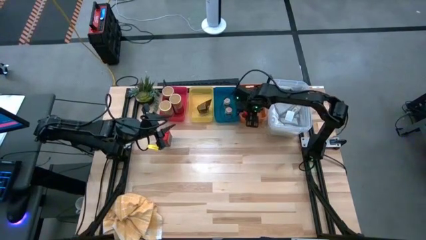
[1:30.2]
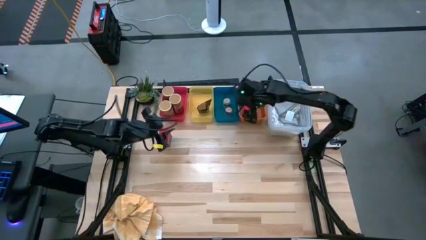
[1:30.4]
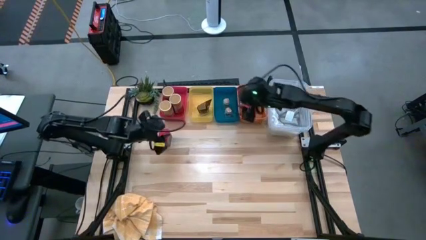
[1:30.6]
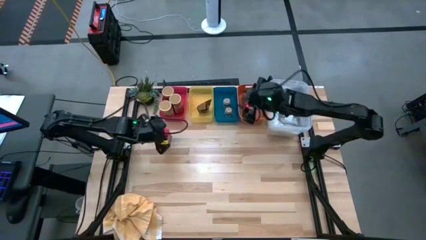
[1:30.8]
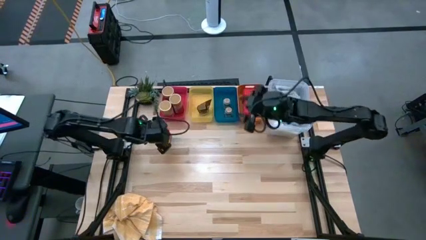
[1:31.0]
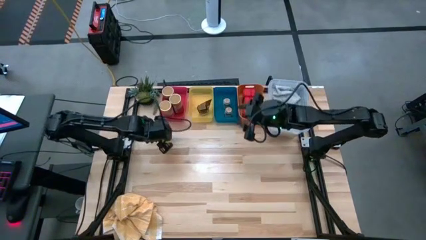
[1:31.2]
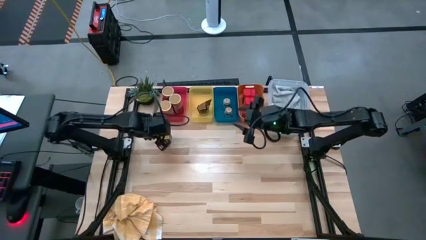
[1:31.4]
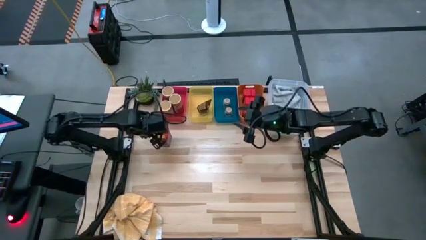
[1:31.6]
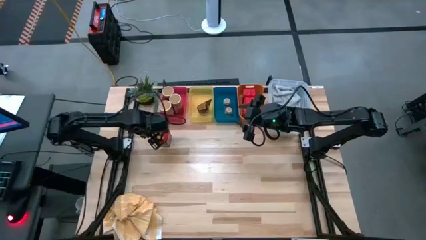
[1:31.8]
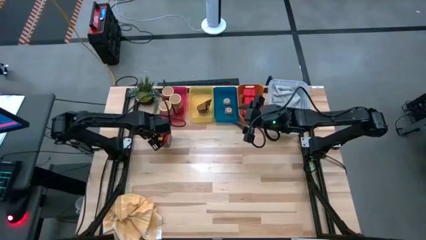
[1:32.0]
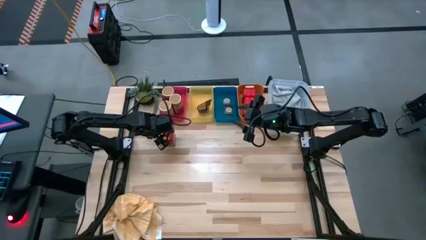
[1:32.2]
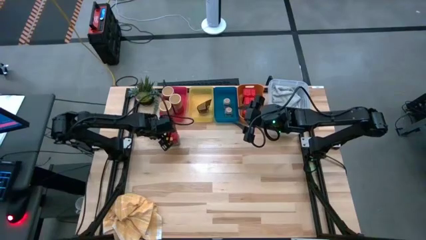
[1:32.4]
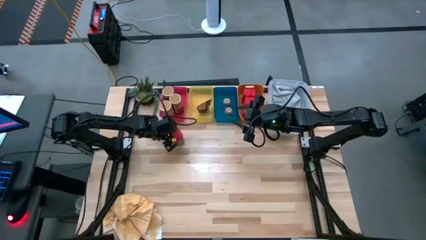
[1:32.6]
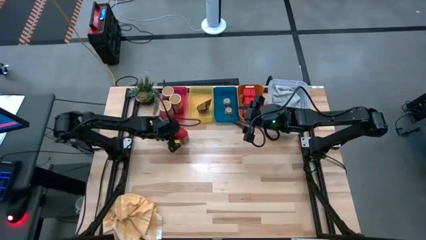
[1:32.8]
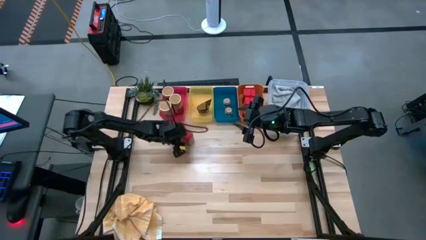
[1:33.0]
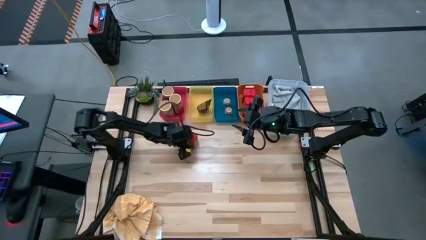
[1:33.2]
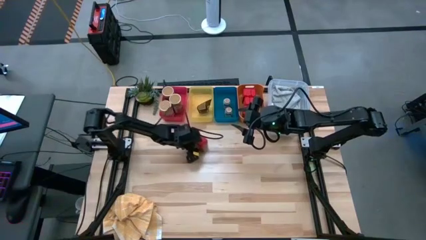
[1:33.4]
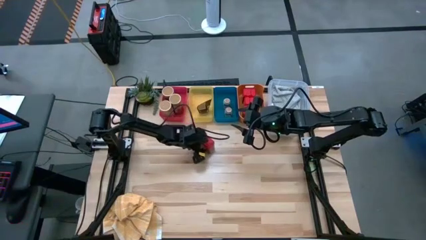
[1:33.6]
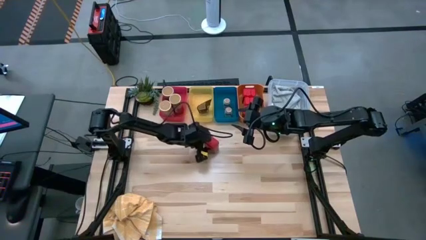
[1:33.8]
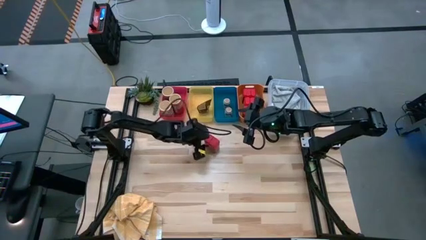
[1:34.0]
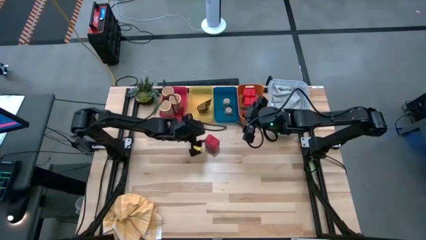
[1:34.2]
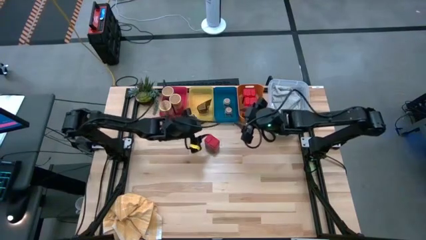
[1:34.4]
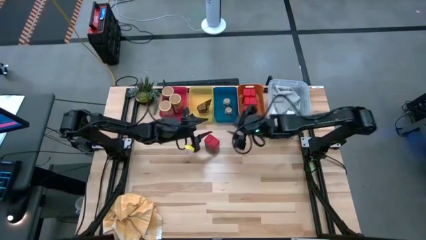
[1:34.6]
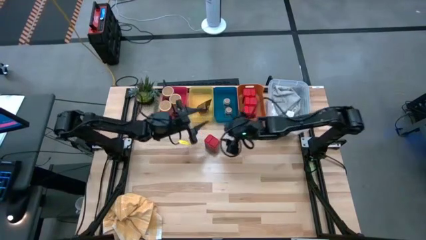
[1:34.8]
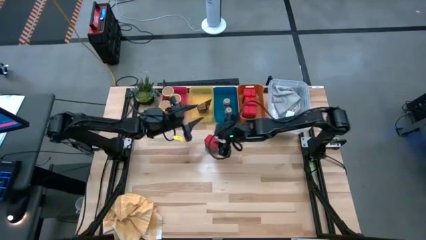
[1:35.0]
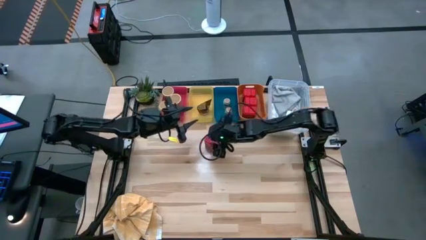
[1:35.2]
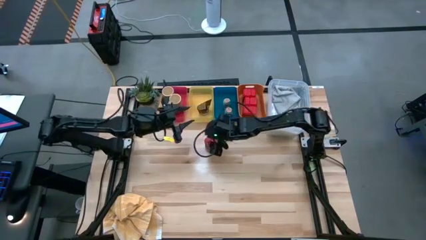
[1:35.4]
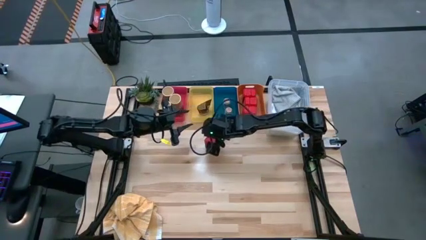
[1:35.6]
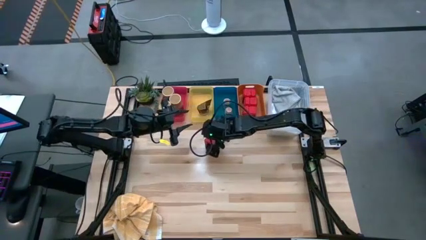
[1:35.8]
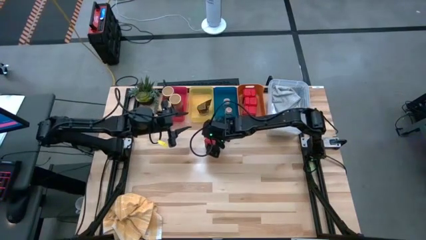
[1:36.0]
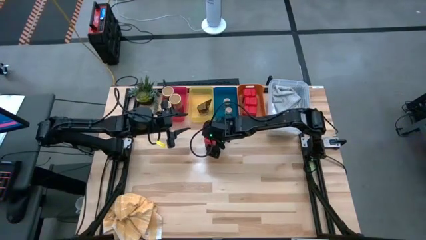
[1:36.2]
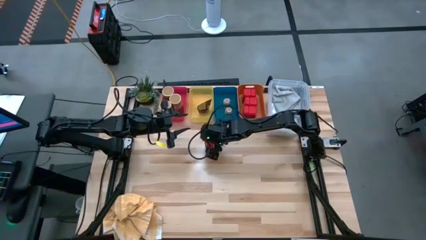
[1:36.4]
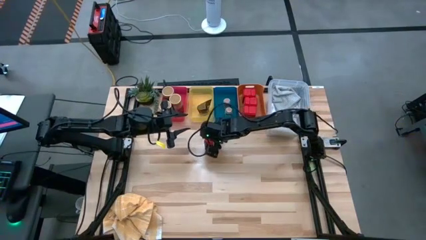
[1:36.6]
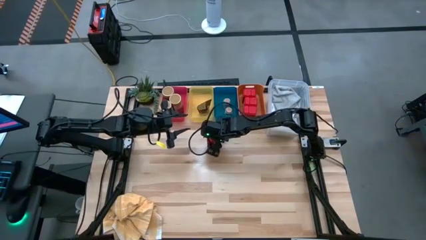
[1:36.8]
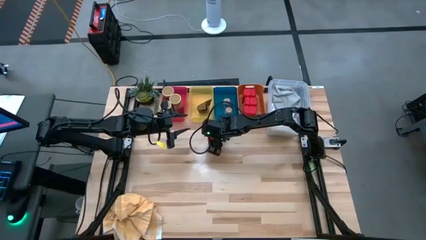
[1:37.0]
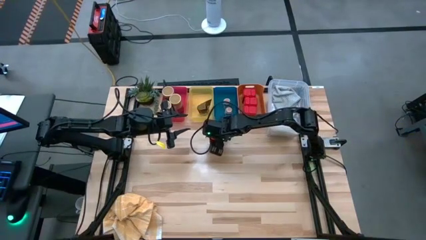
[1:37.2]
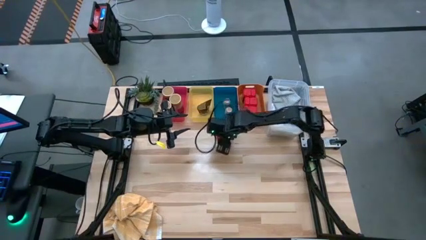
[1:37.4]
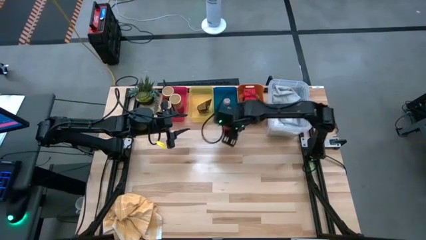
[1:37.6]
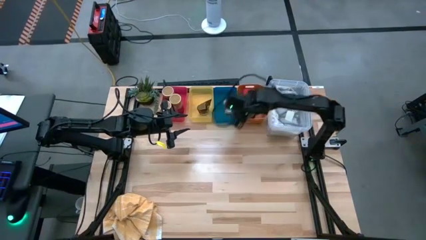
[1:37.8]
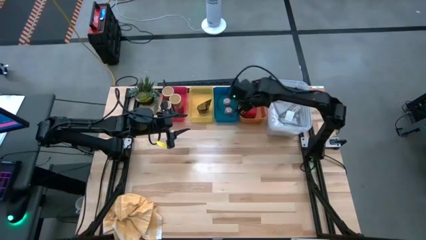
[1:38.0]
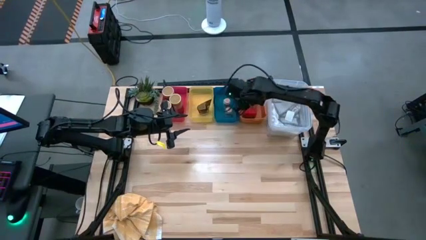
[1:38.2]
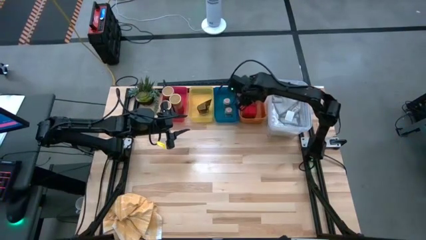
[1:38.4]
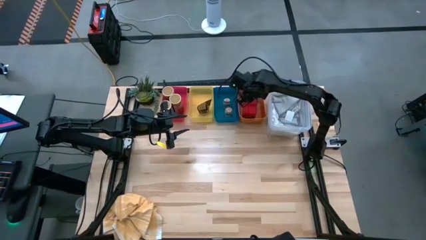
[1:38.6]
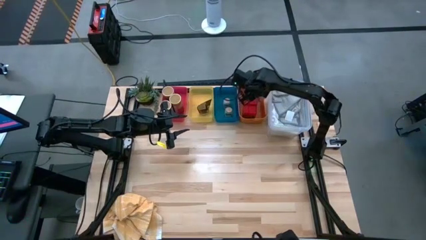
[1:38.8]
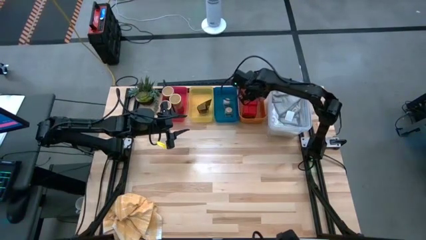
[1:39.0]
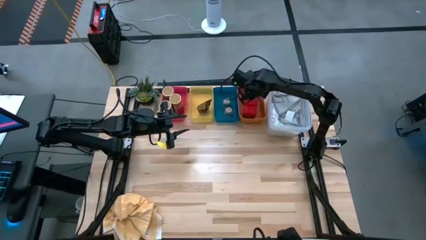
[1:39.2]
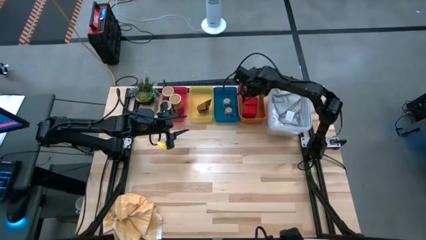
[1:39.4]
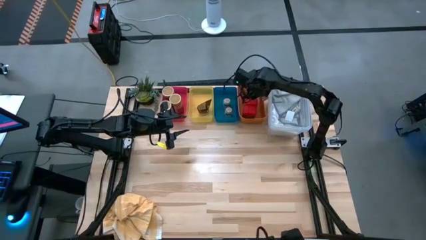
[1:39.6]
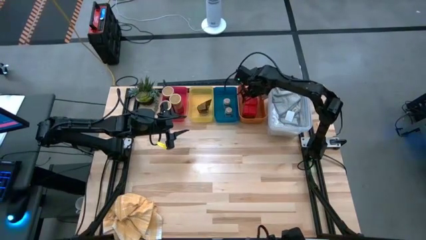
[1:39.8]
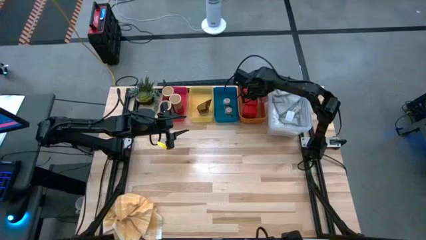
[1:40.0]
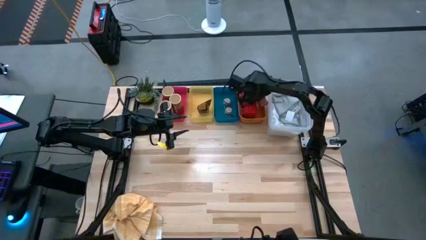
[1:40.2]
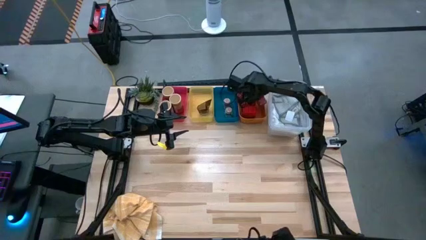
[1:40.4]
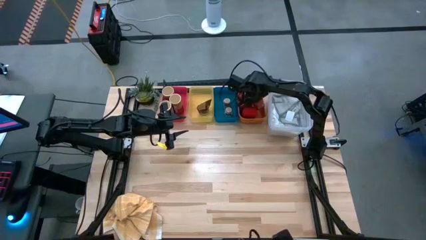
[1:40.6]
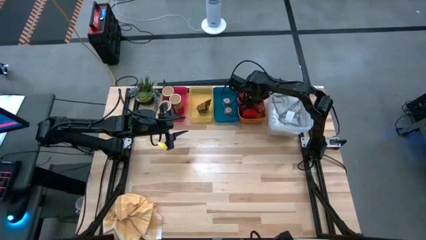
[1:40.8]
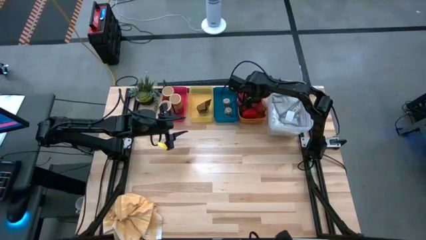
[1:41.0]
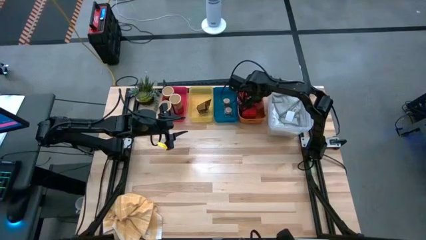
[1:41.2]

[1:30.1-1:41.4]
Task: Sort spices by type
Put the red spice can into the orange bin
